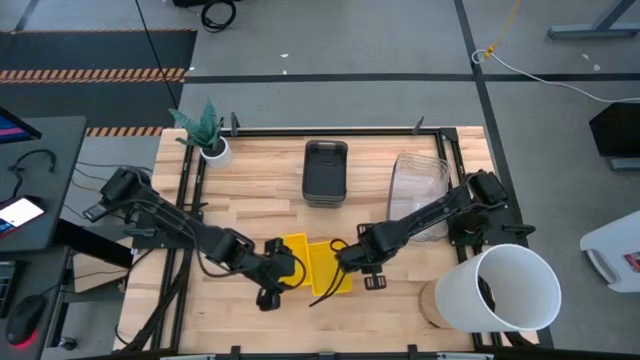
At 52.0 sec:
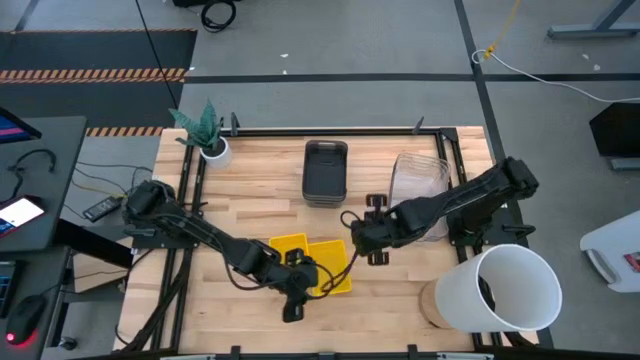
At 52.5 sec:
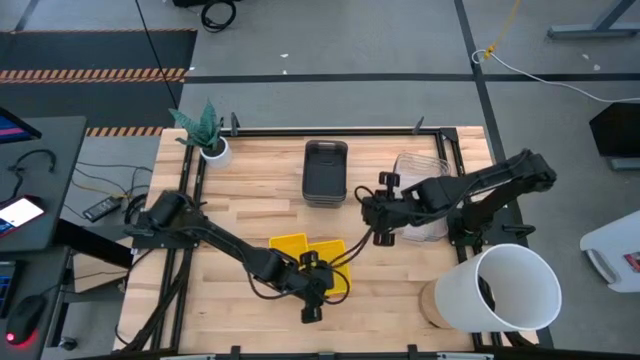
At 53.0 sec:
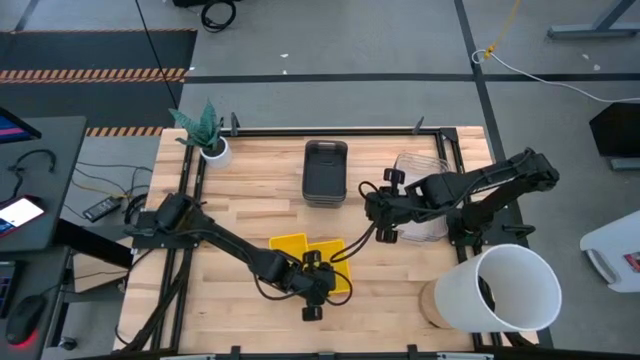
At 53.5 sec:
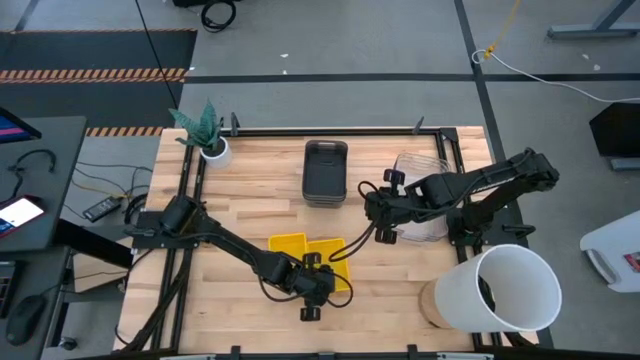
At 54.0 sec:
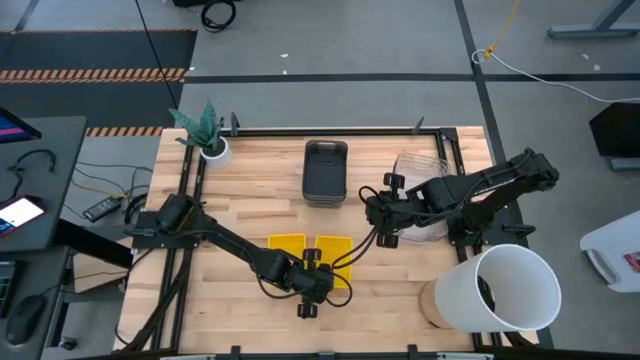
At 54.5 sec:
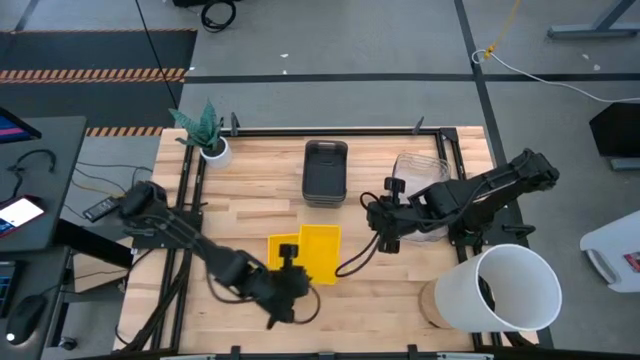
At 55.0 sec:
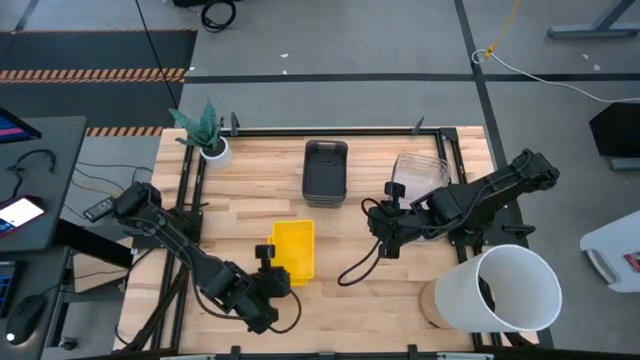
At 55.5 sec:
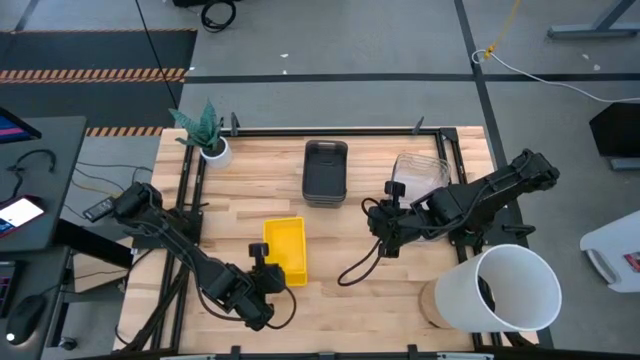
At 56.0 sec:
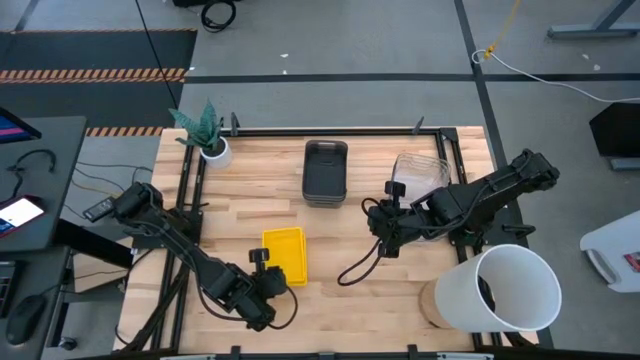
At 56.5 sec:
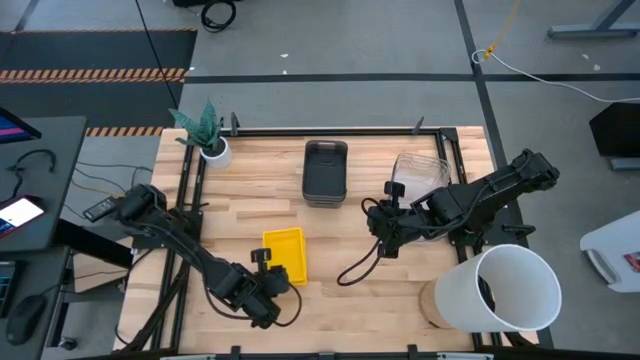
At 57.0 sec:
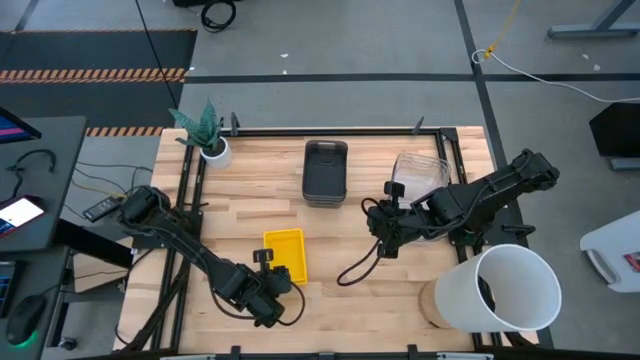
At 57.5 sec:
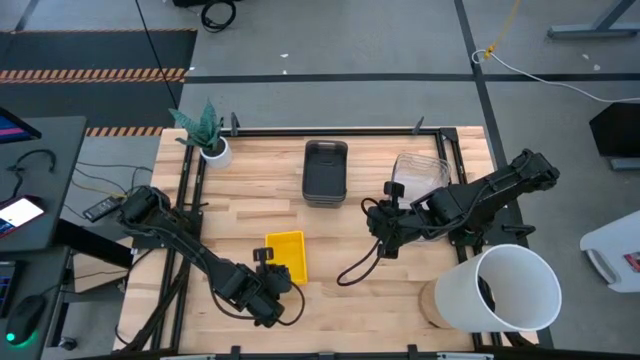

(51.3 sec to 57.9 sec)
Stack the yellow bin on top of the stacked yellow bins

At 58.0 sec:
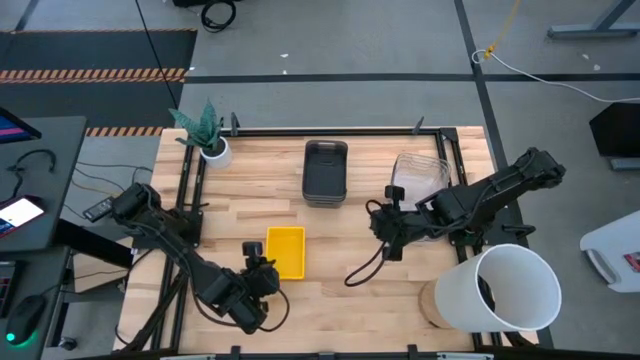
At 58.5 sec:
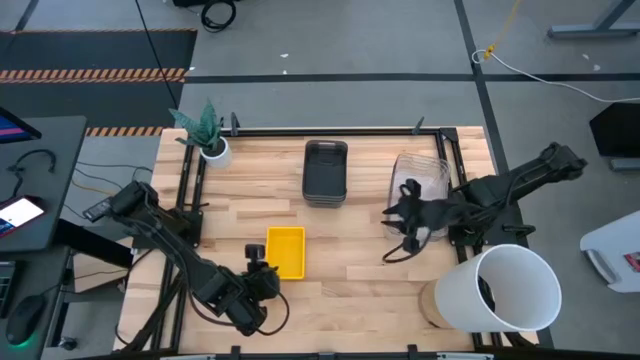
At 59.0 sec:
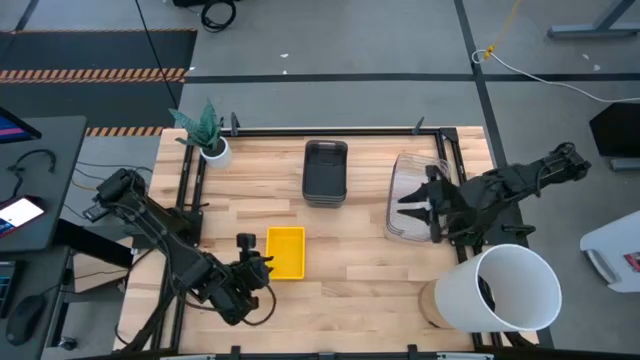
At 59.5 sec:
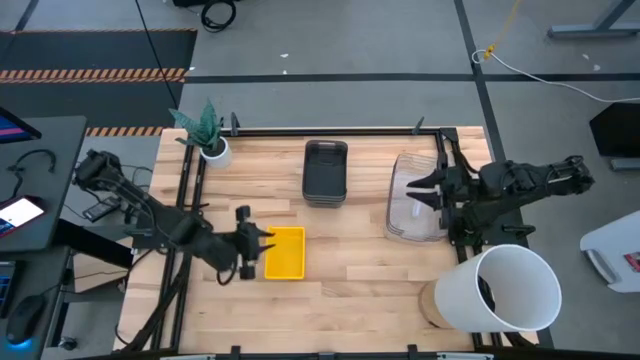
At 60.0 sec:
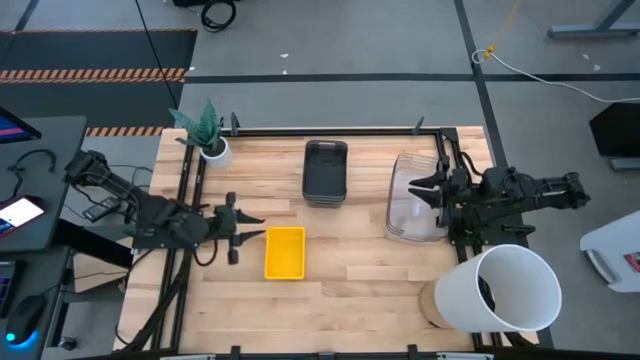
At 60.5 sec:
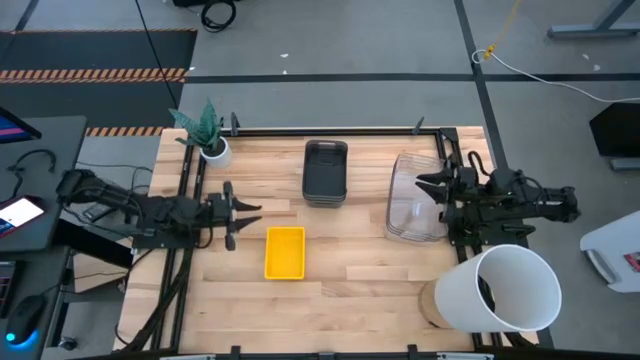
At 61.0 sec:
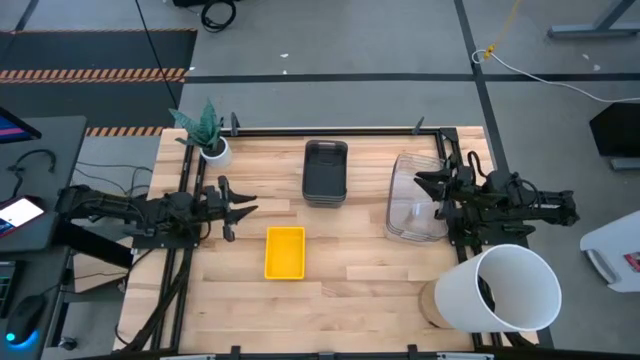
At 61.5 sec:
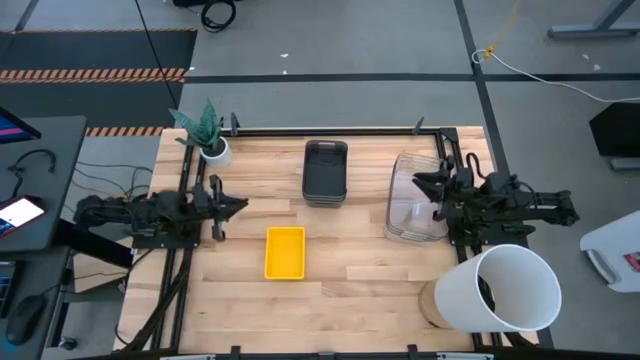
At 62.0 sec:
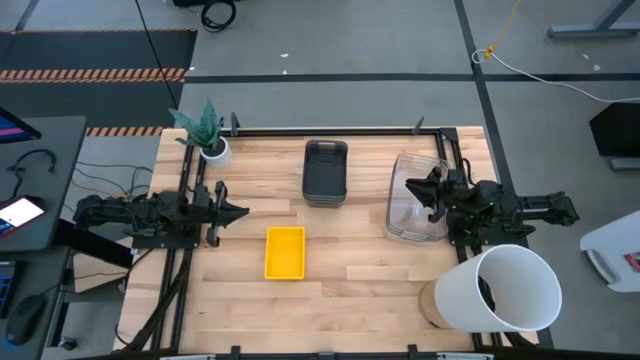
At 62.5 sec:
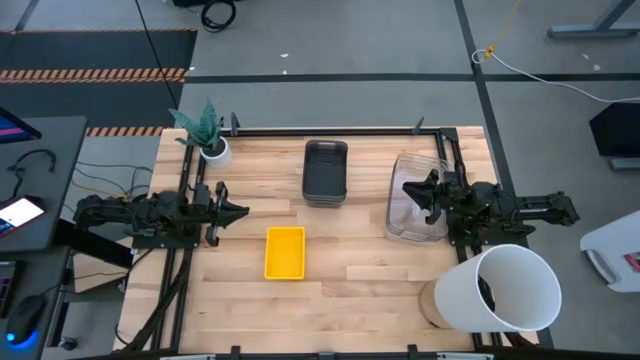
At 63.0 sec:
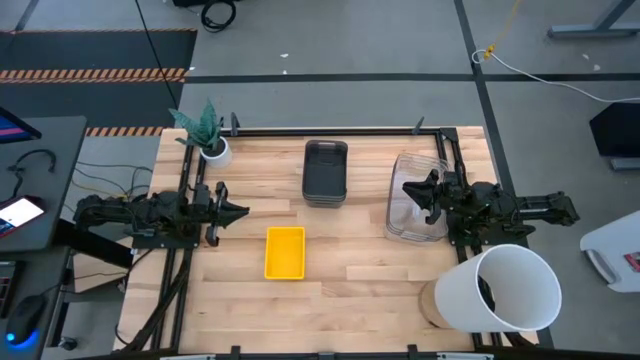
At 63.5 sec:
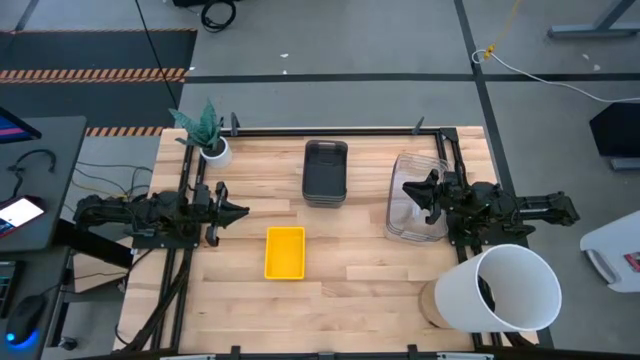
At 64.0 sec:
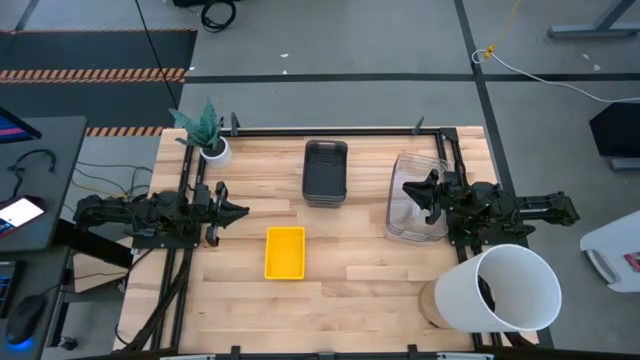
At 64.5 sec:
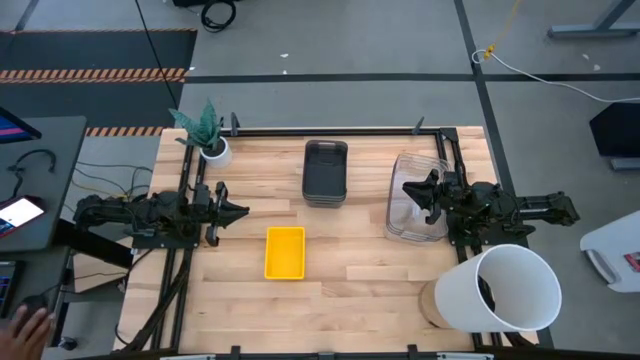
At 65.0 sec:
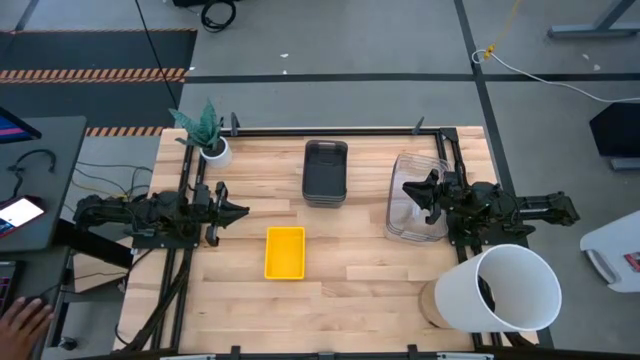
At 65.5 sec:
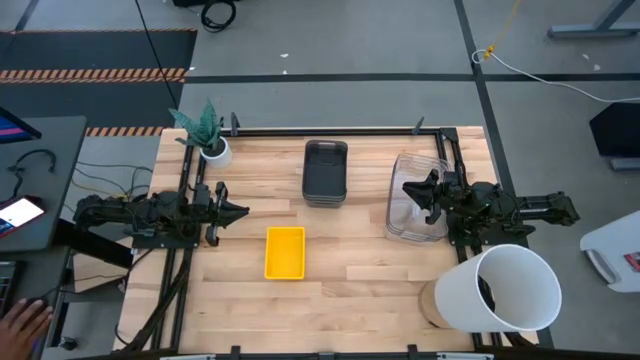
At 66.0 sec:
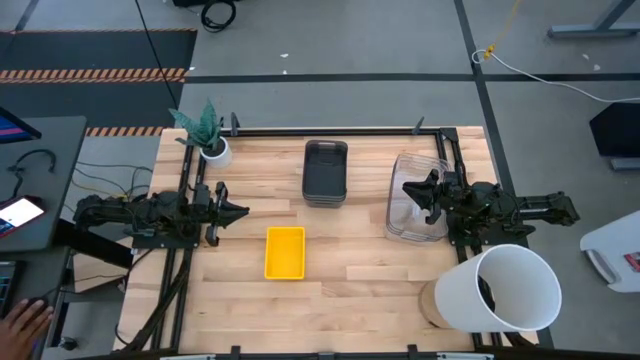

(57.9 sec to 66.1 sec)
Return to Home Position

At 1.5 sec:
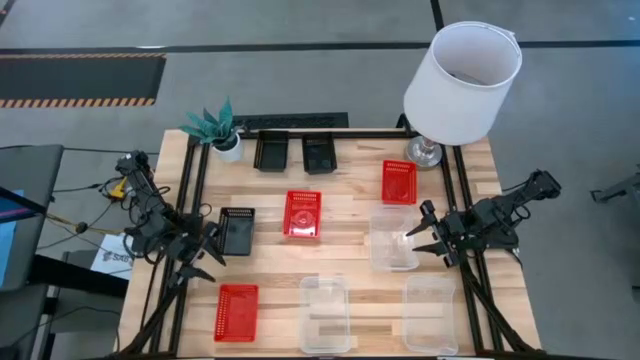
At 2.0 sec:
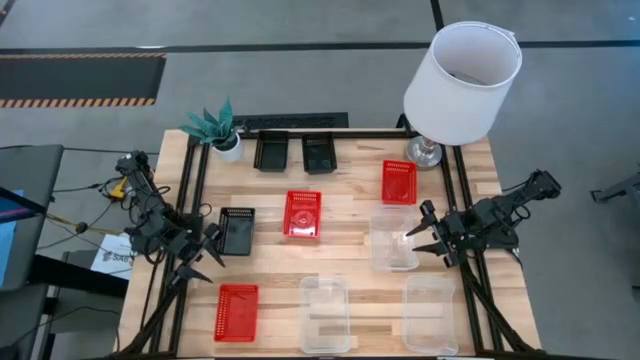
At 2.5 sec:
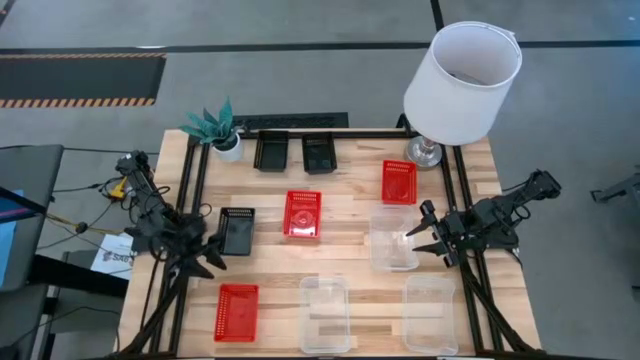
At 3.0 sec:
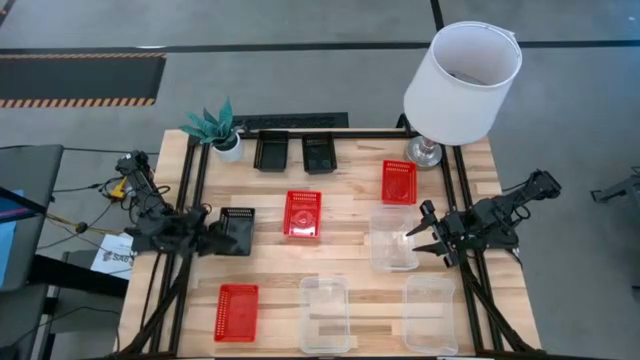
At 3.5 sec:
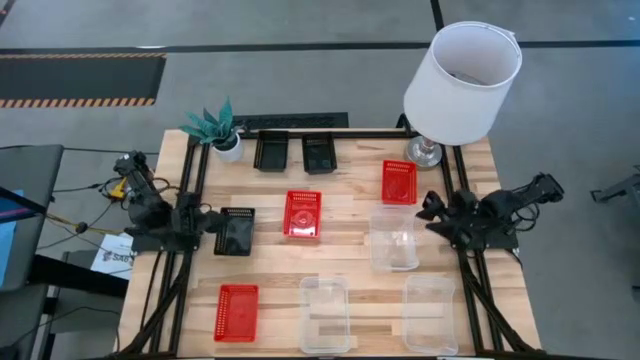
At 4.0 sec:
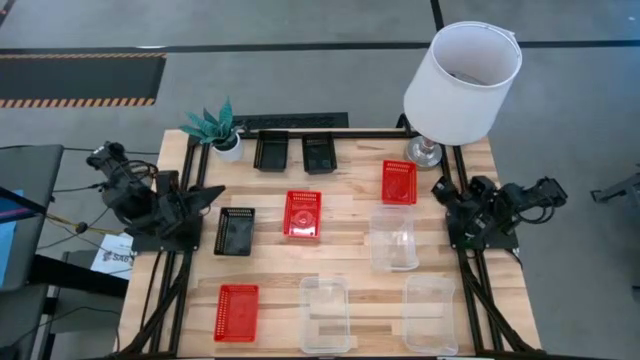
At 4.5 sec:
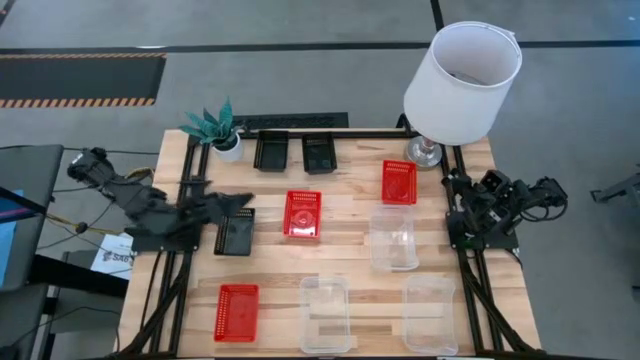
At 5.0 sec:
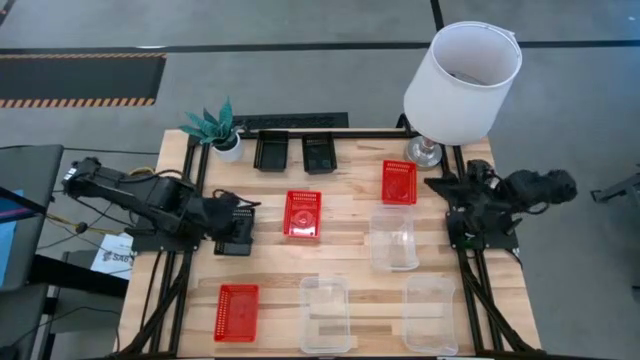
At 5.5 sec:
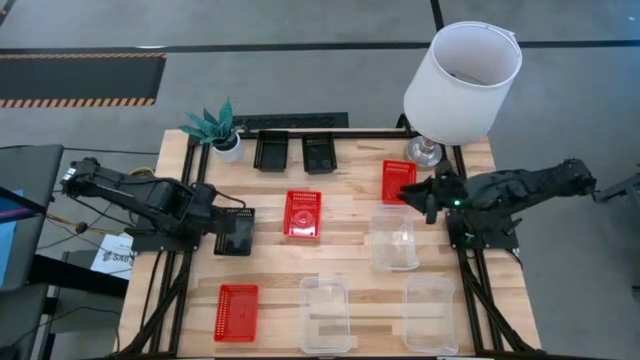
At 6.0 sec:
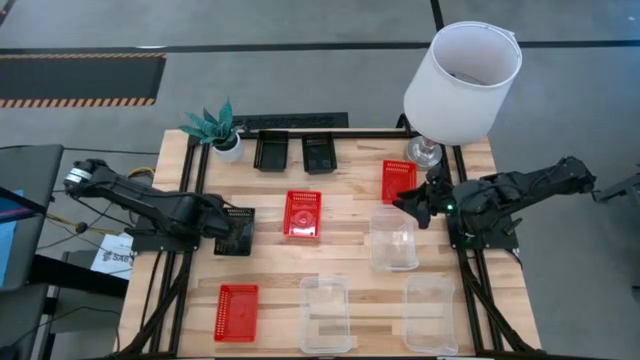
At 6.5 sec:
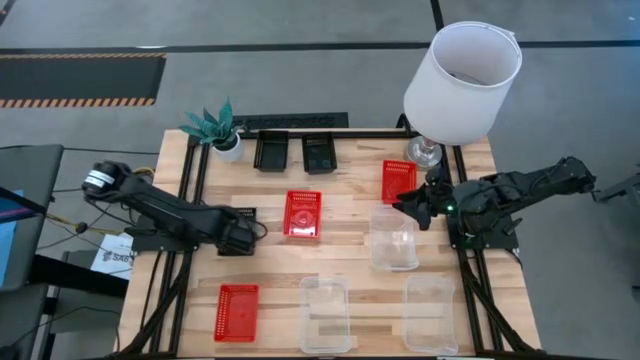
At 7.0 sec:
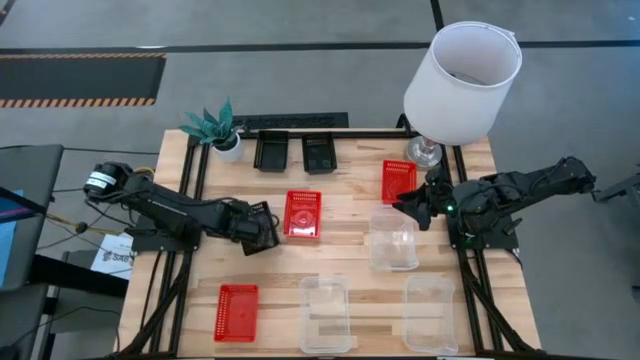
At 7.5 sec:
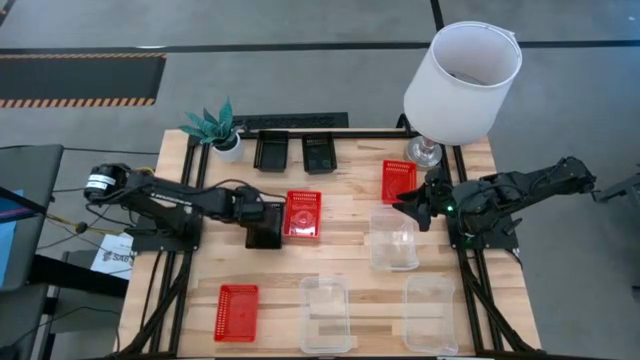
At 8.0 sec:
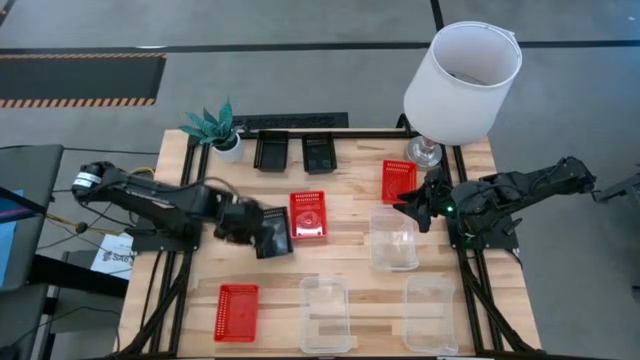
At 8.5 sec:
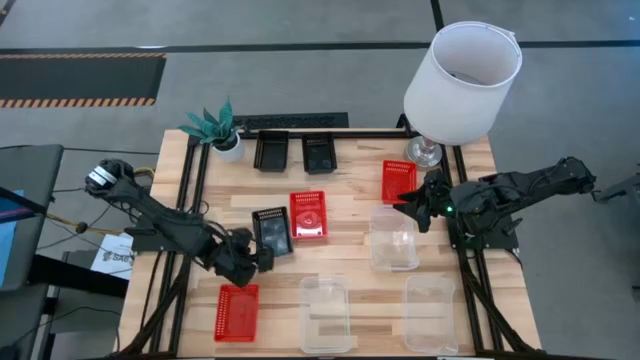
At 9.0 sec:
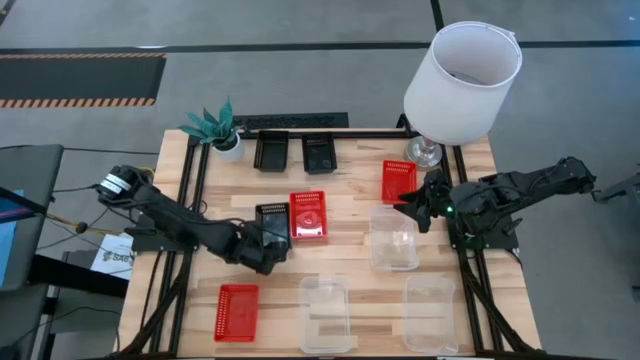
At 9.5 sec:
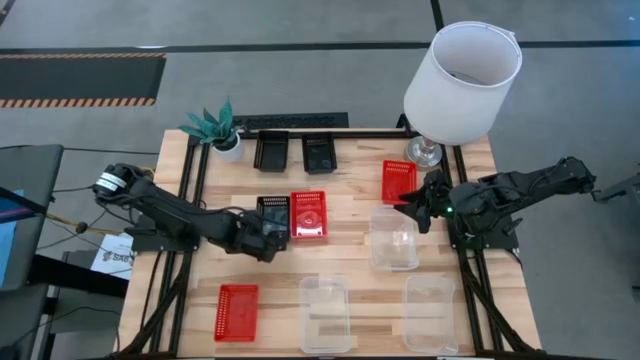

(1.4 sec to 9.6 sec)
Move the bottom black bin from the left to the right of the table
